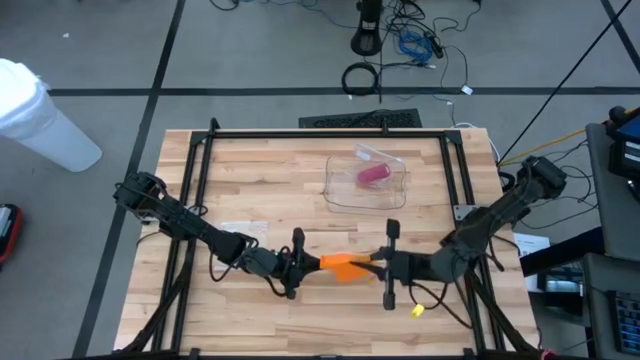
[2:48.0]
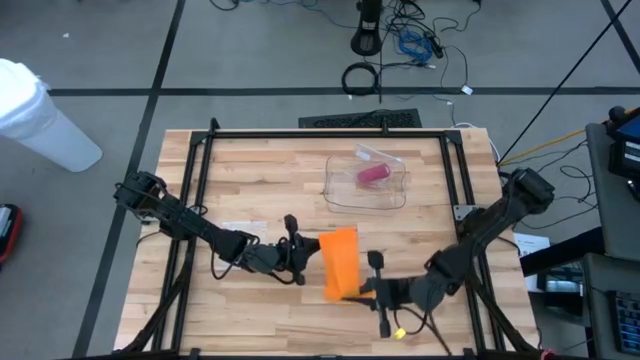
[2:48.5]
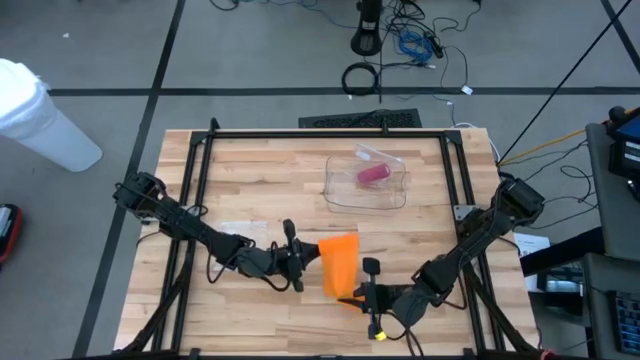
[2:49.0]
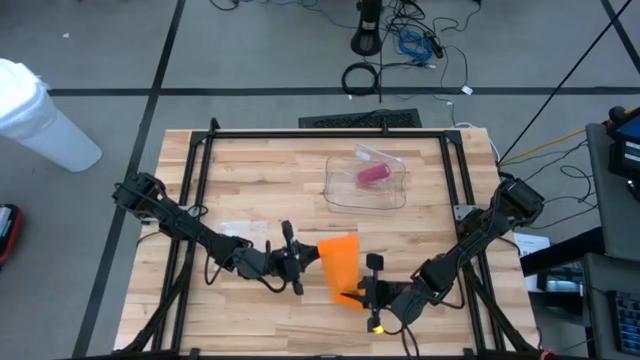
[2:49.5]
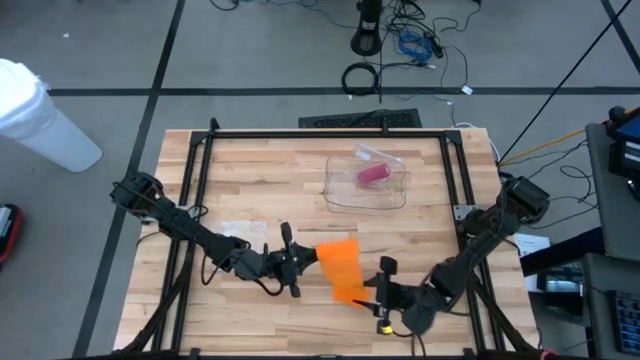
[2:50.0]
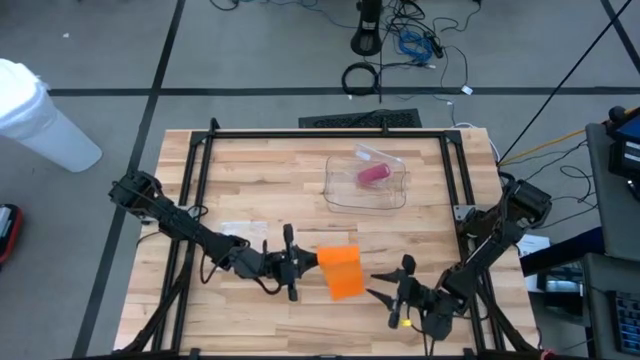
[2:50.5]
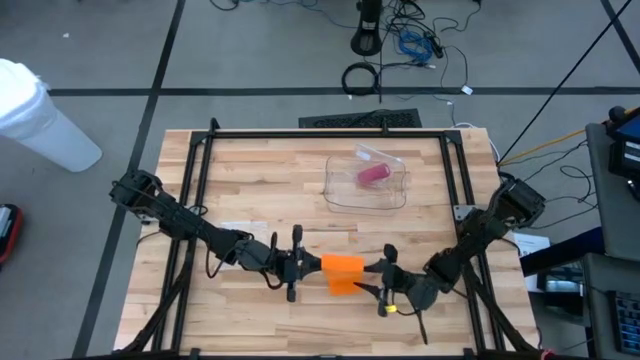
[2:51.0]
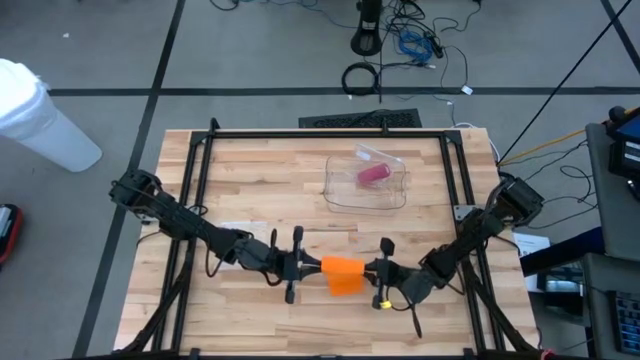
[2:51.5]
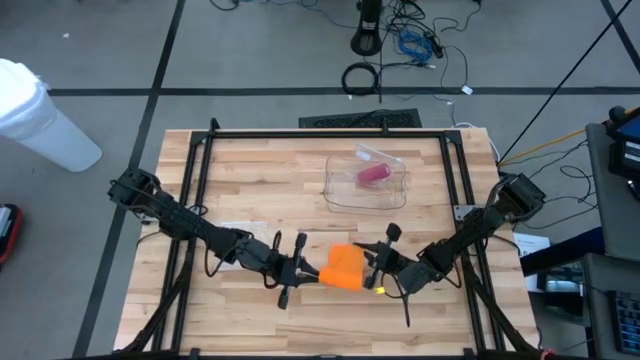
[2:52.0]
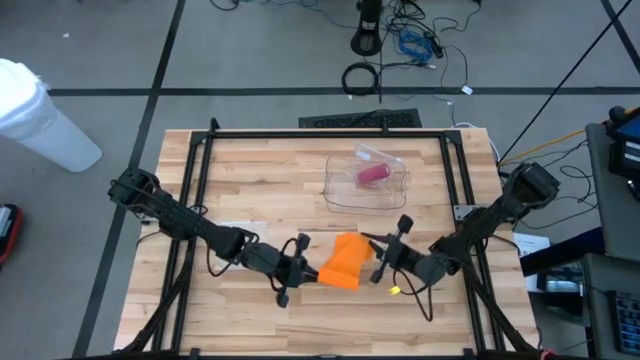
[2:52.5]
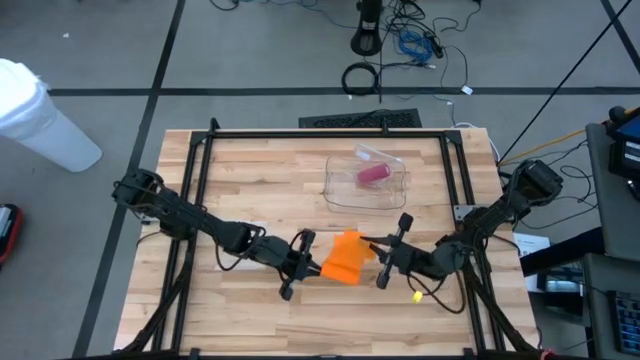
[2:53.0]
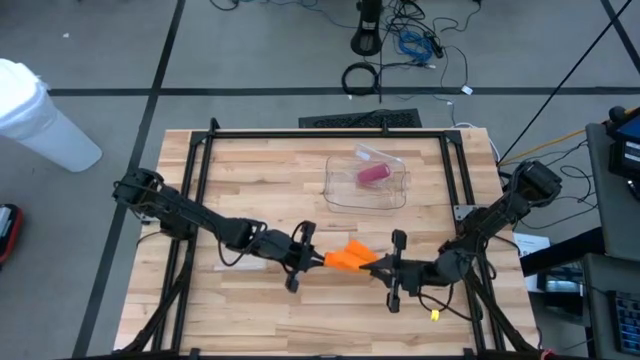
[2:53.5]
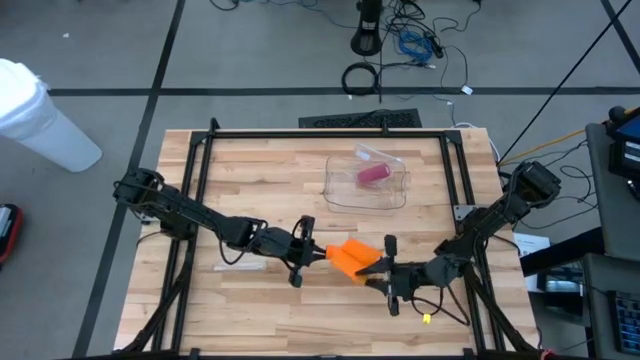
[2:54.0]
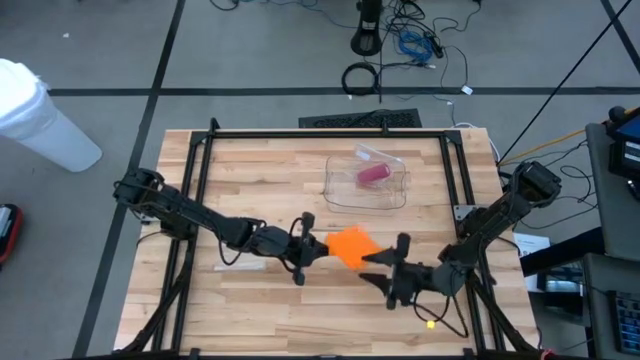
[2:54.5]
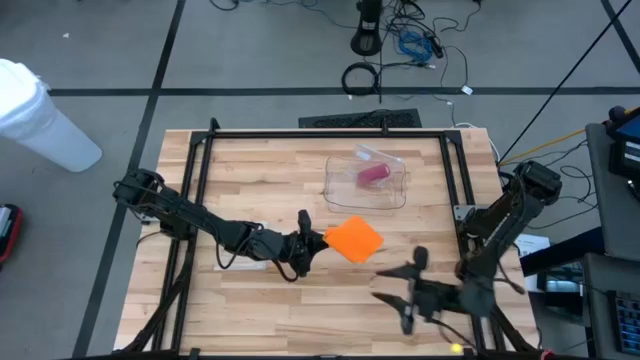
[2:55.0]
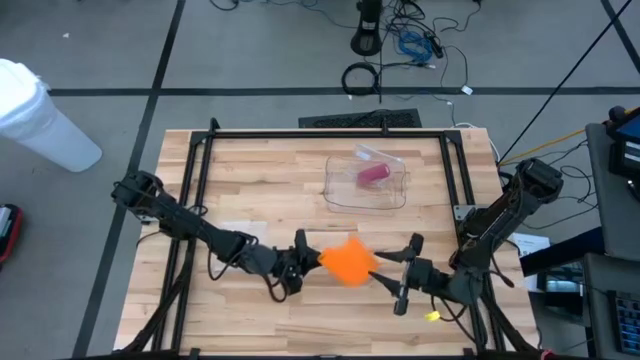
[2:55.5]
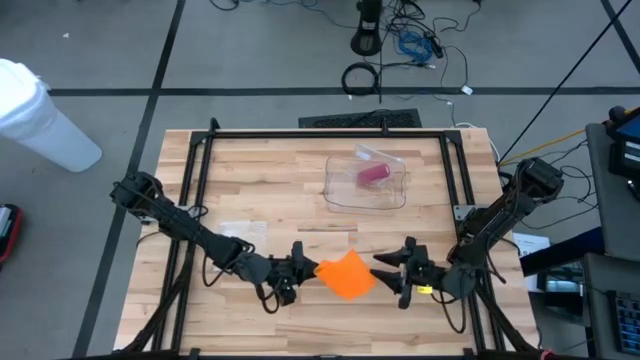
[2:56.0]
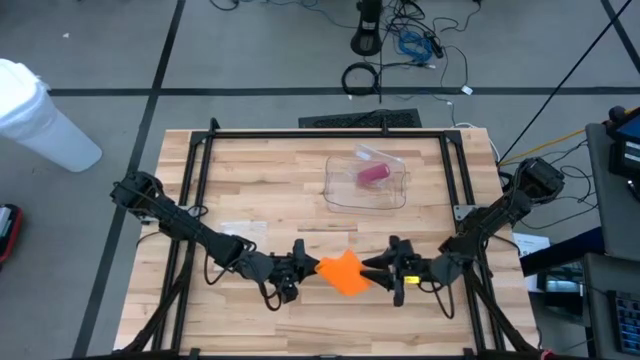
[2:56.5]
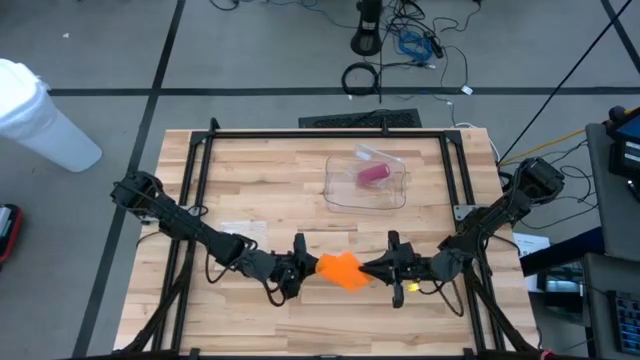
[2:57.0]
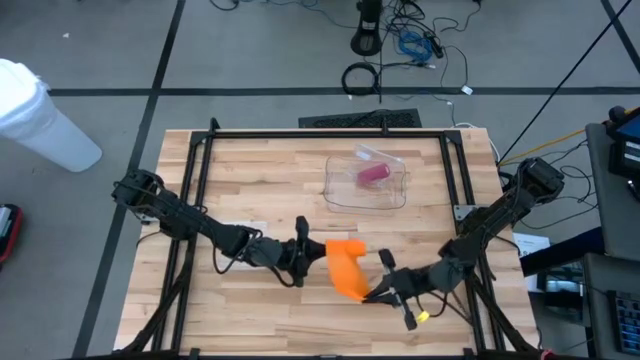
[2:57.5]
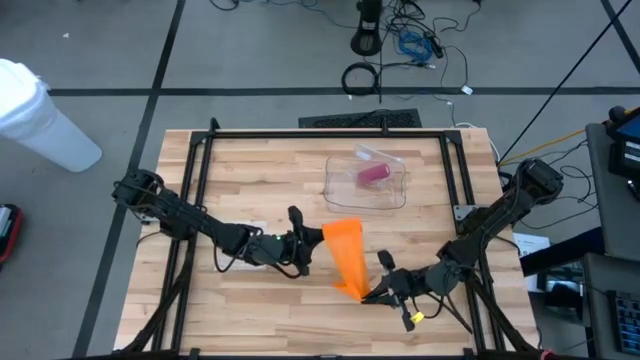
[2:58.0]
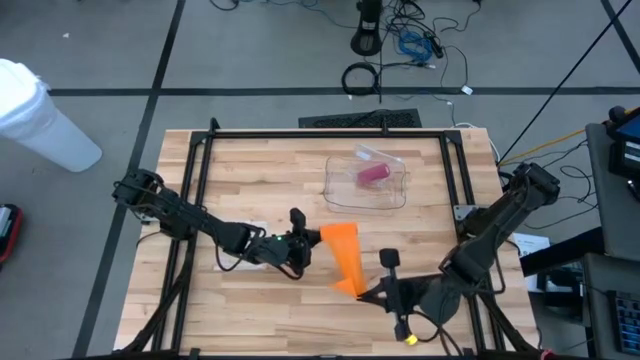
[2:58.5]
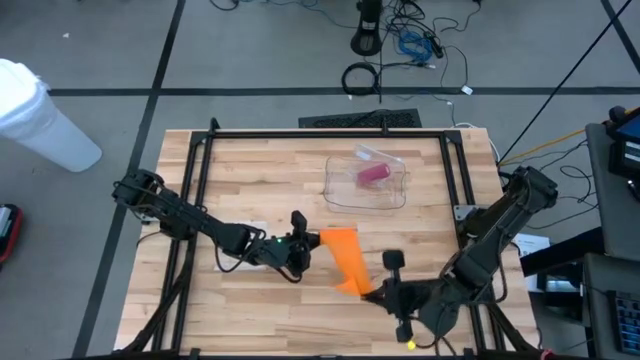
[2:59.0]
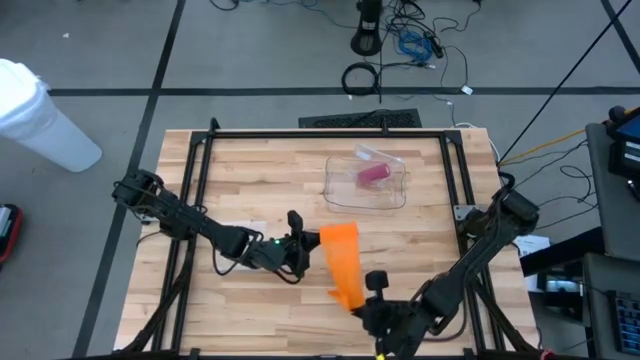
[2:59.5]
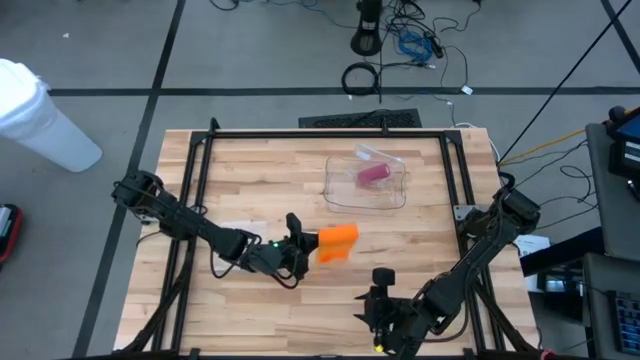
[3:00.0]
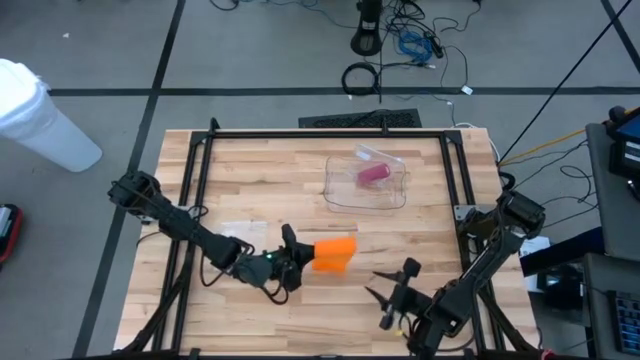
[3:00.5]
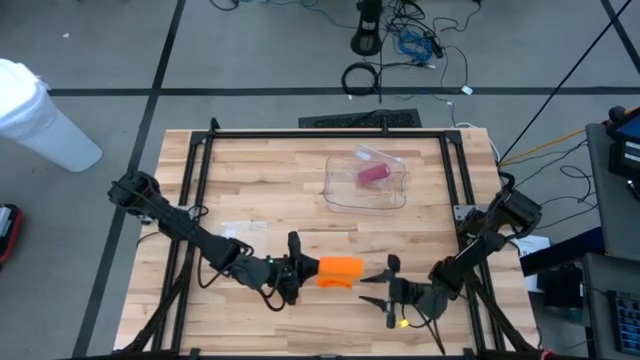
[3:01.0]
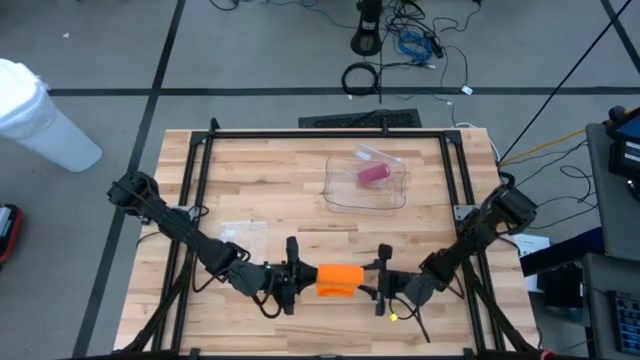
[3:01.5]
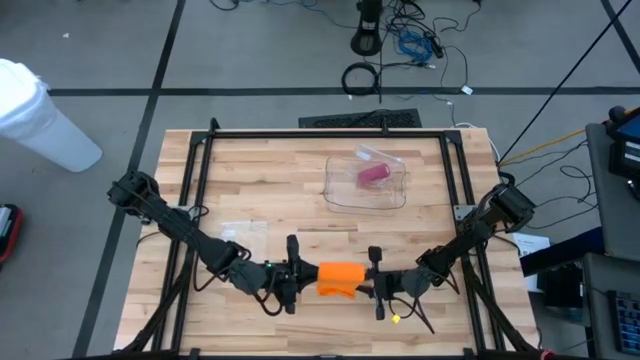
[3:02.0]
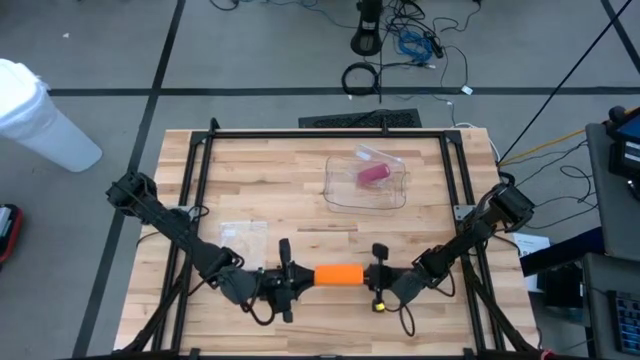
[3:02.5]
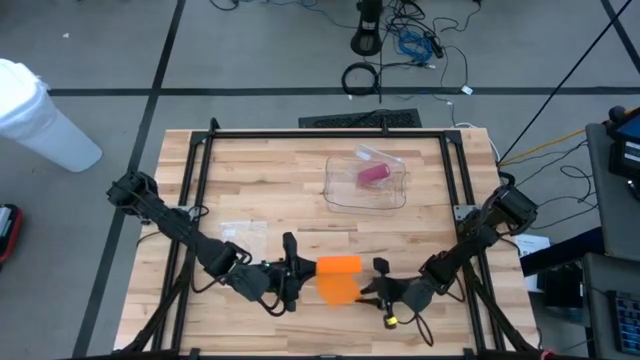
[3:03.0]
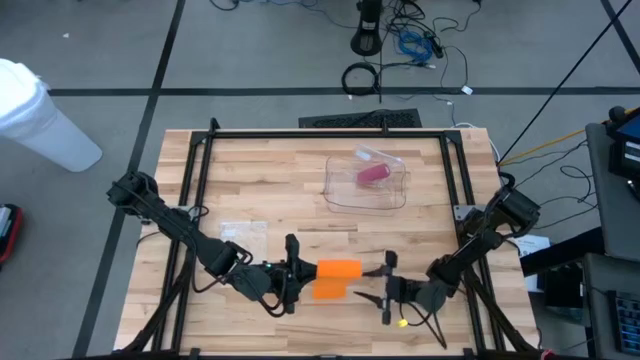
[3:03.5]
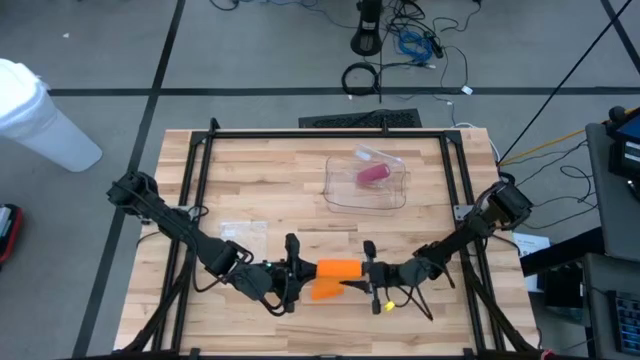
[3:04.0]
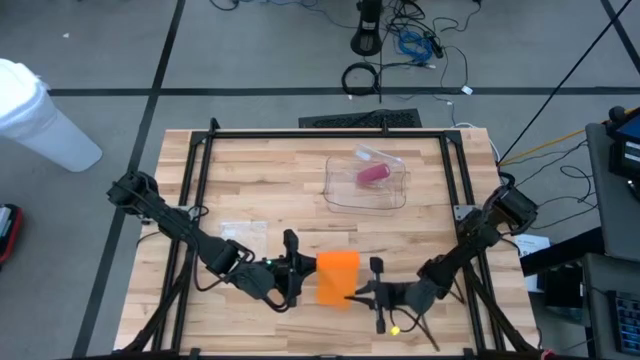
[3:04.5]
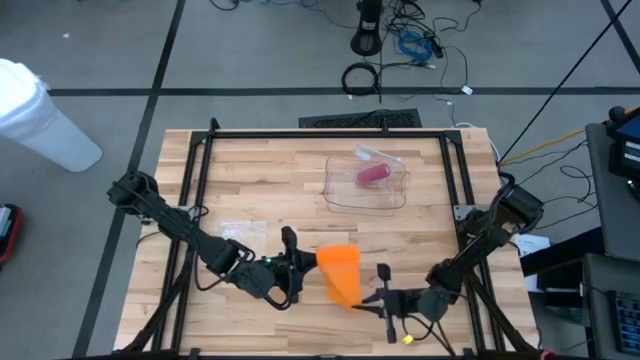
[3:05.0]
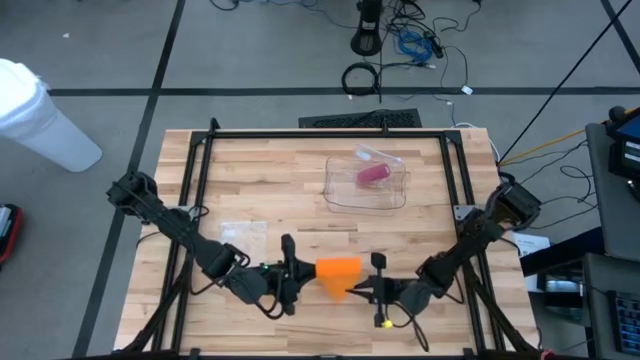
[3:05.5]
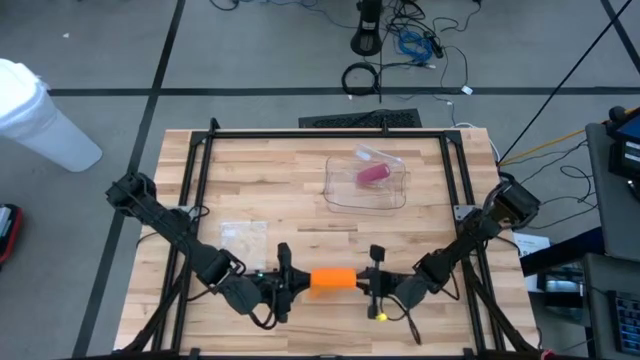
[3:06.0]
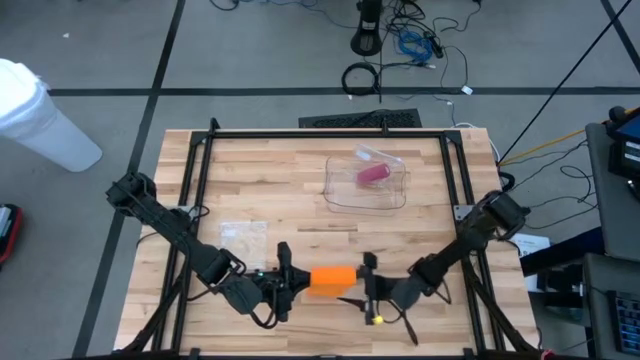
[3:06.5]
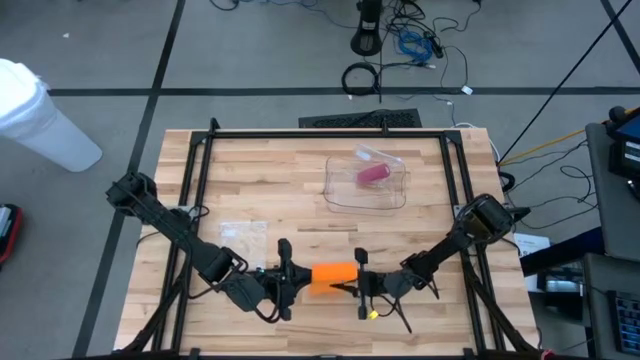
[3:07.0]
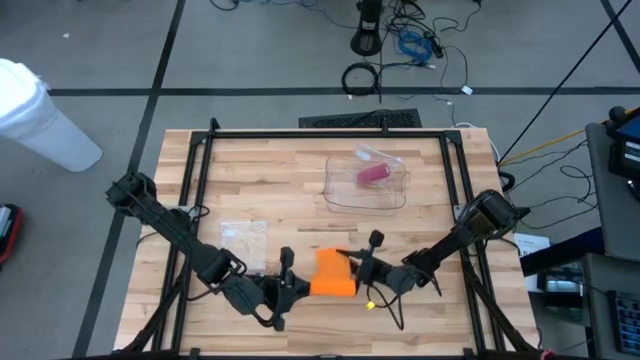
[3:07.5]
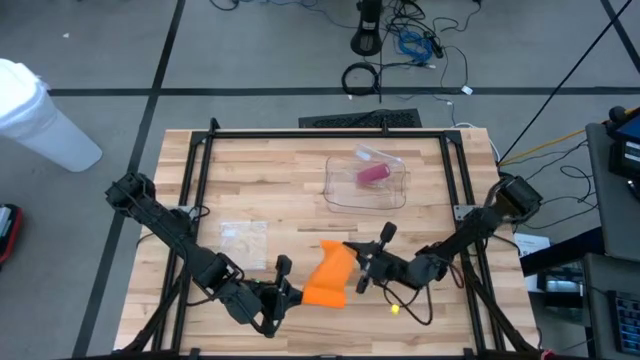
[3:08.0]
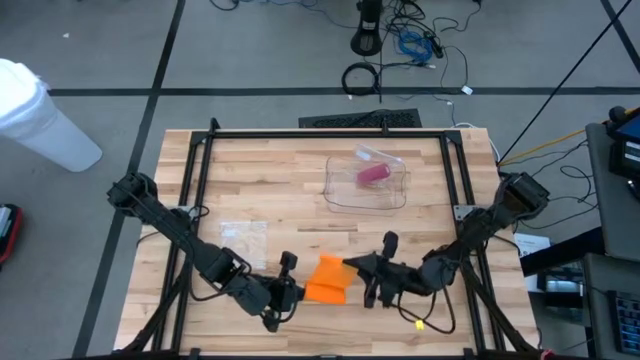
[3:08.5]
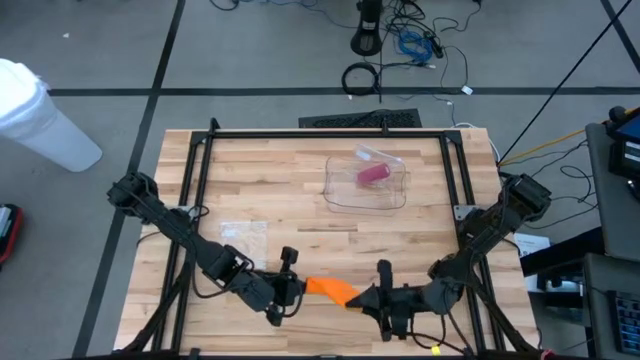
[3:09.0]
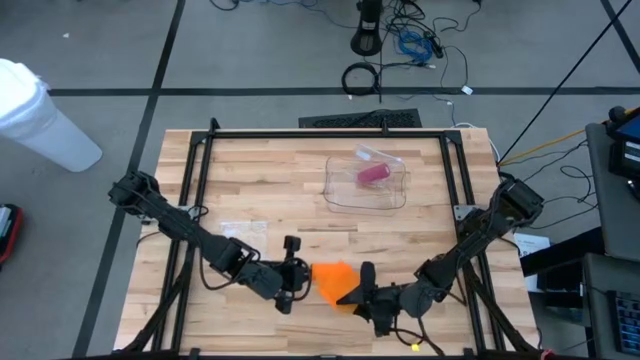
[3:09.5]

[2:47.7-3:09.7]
Task: Roll bandage
Roll the orange bandage
